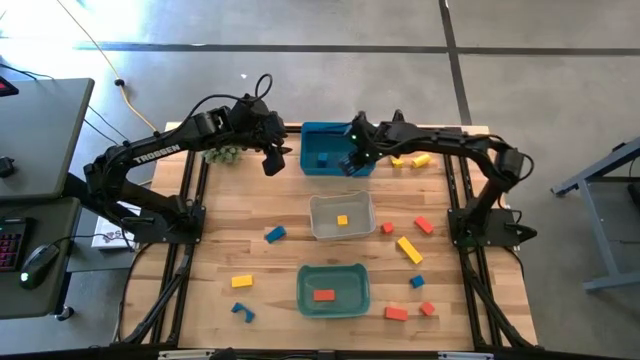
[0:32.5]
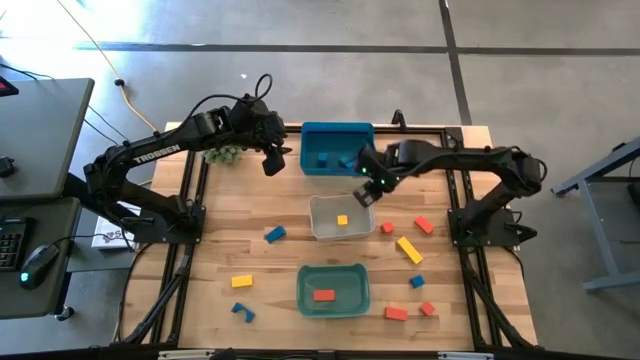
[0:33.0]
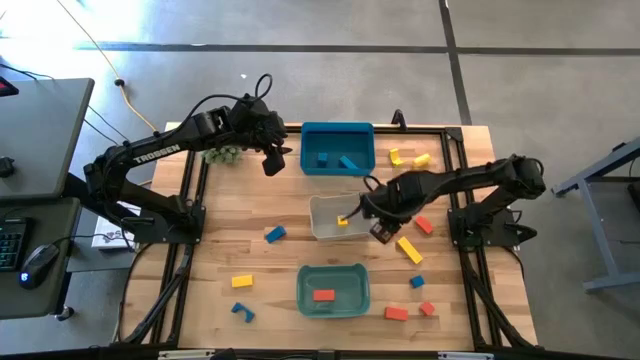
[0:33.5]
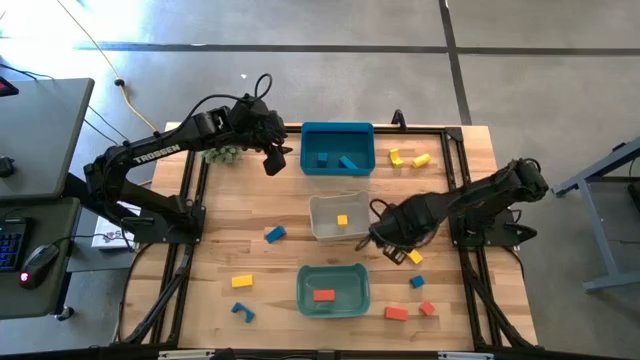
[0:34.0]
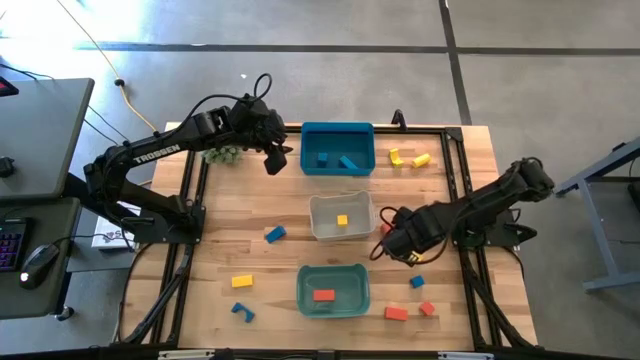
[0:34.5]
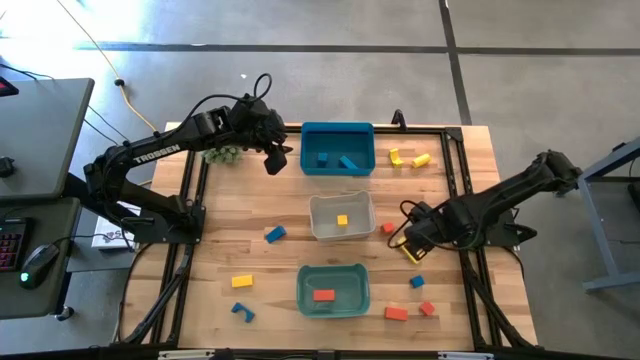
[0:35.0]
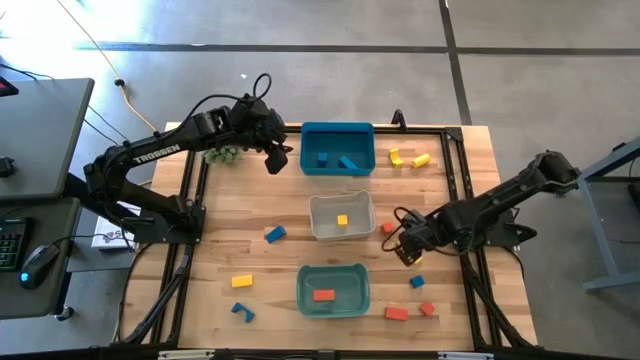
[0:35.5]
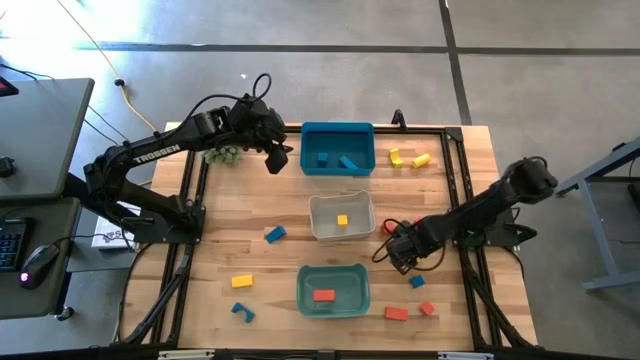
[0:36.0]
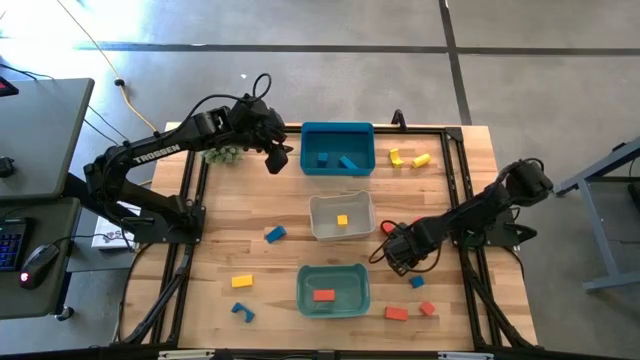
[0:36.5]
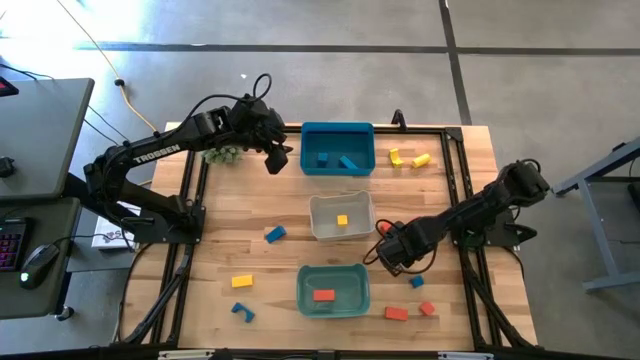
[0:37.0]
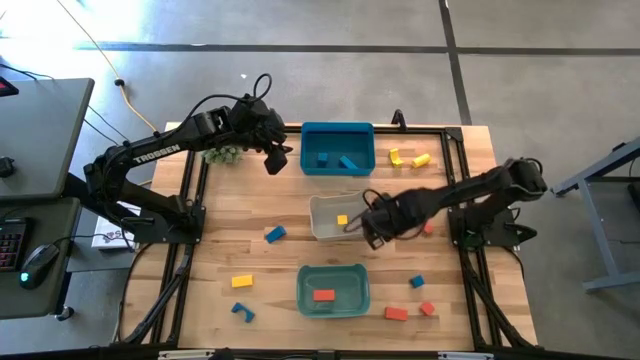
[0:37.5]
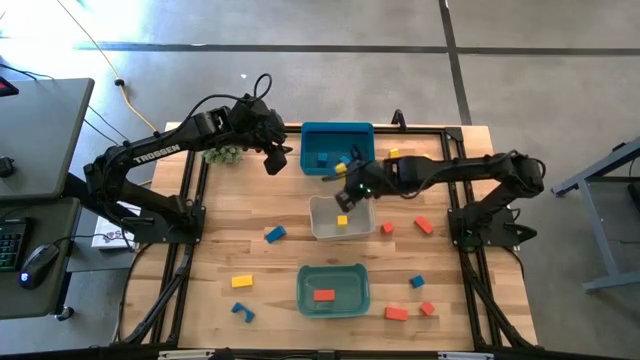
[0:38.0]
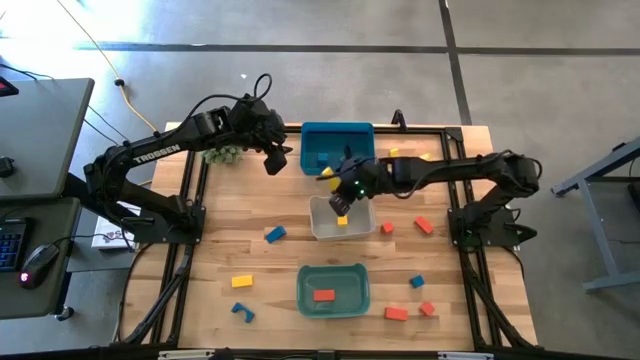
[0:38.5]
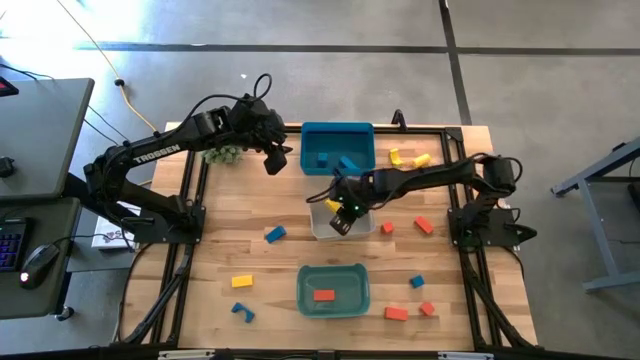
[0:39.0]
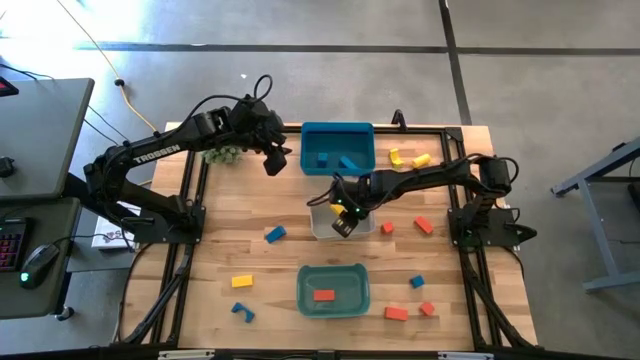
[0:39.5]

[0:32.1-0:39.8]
Task: Sort & place blocks by color
Put the yellow block into the white bin

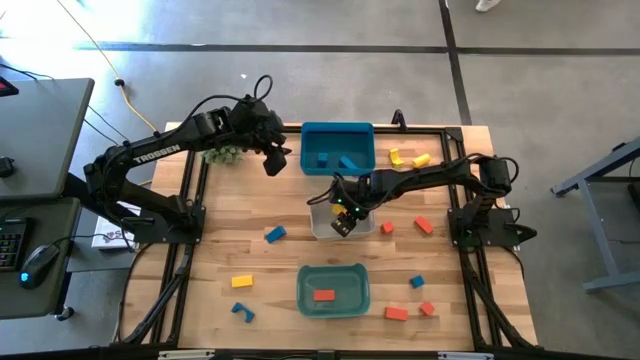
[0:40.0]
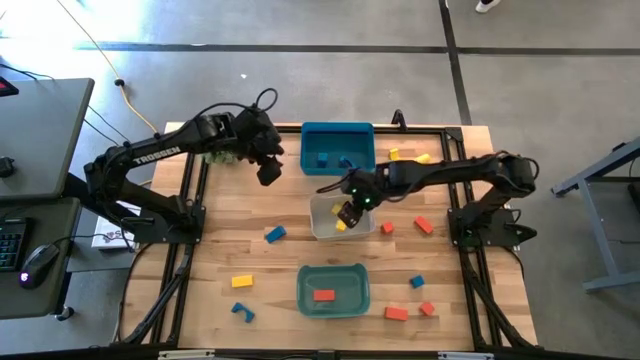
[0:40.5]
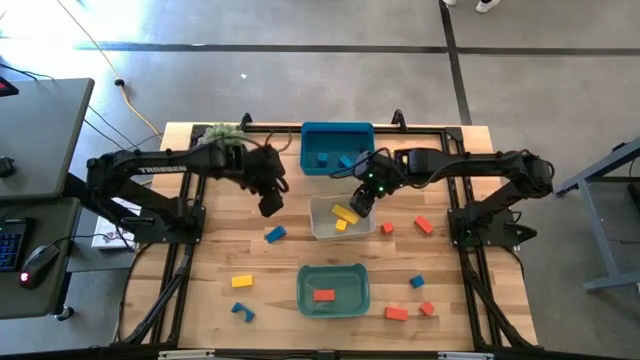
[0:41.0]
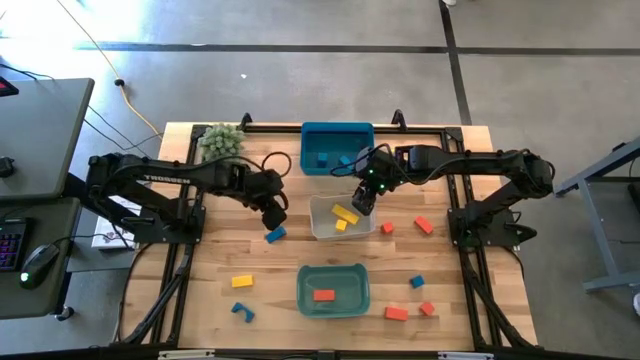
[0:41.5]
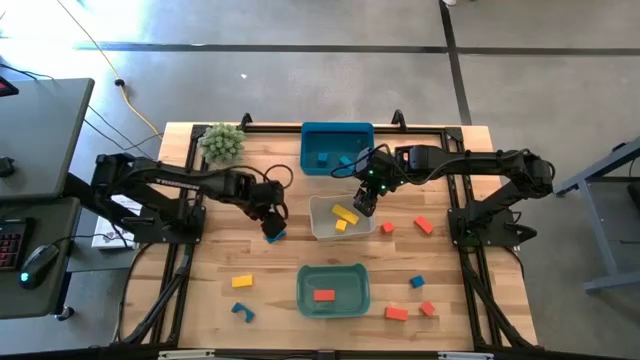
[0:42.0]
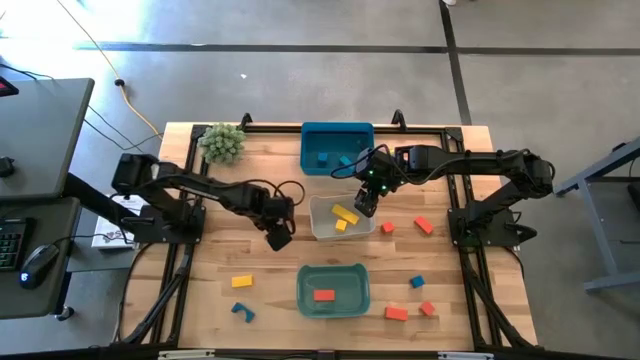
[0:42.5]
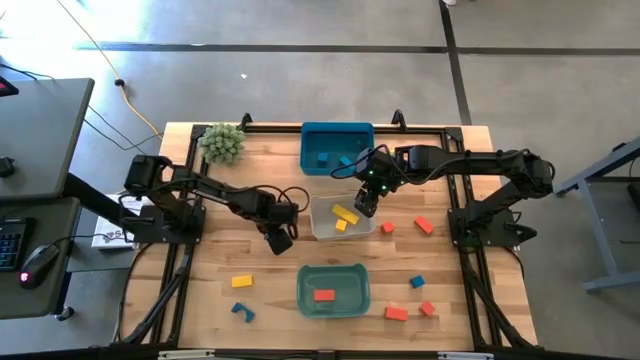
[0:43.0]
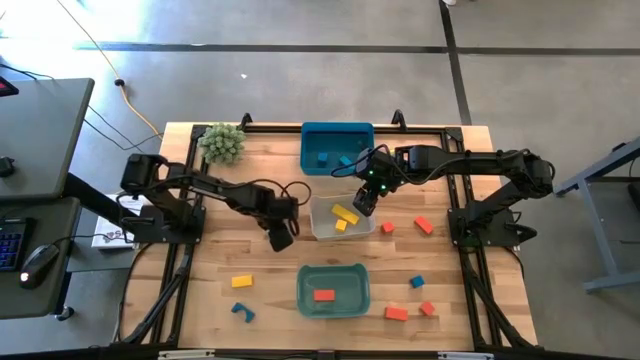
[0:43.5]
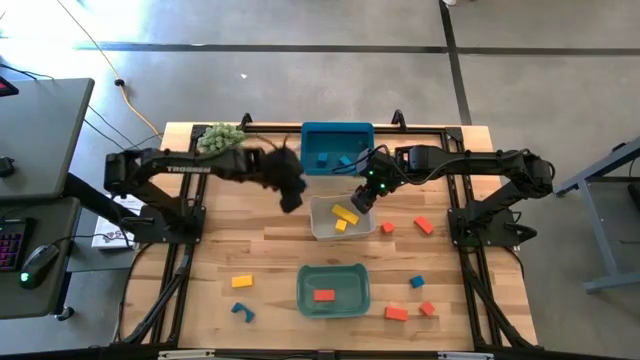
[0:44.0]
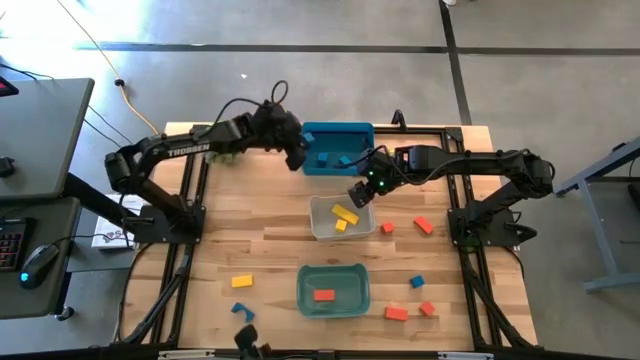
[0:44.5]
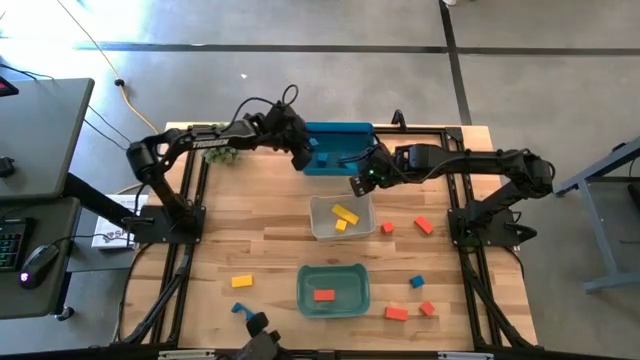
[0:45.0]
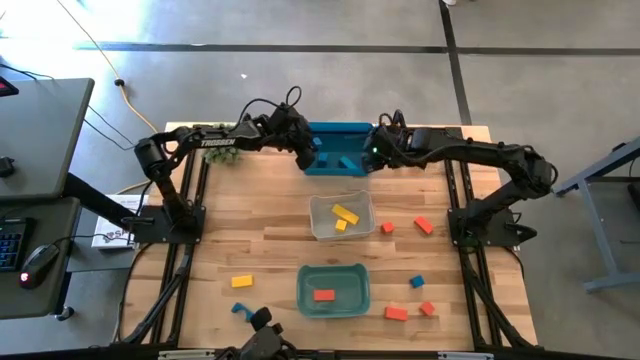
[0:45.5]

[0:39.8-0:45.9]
Put the blue block into the blue bin

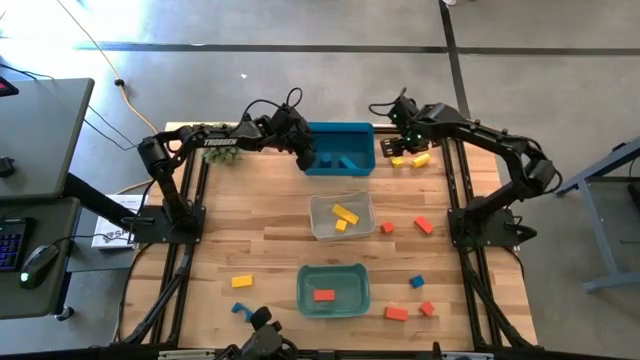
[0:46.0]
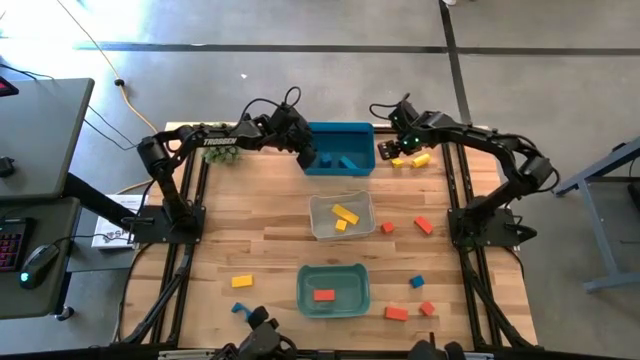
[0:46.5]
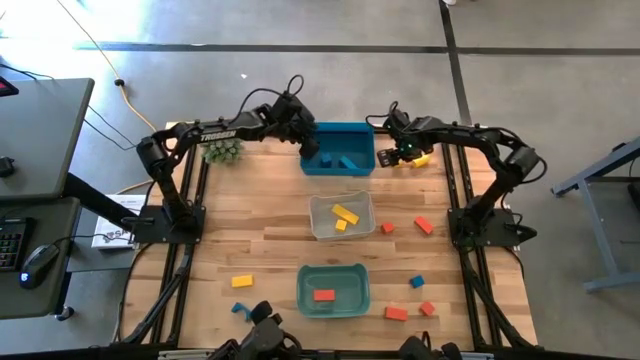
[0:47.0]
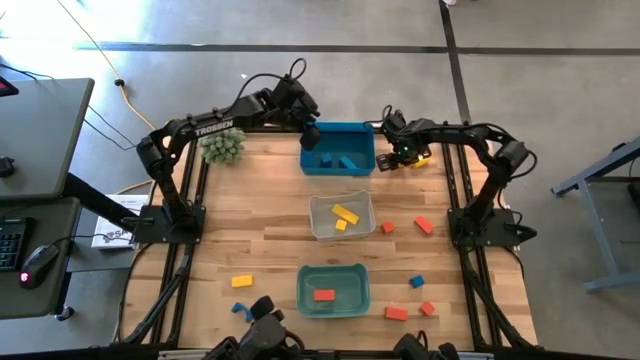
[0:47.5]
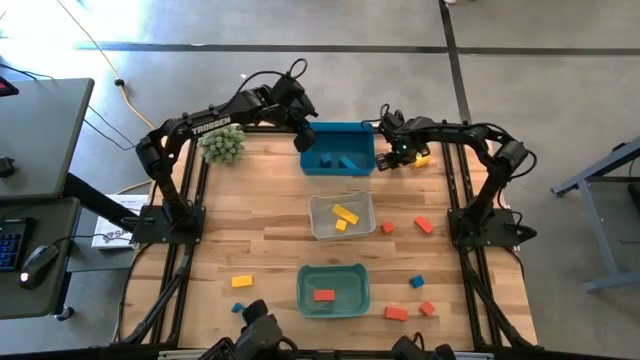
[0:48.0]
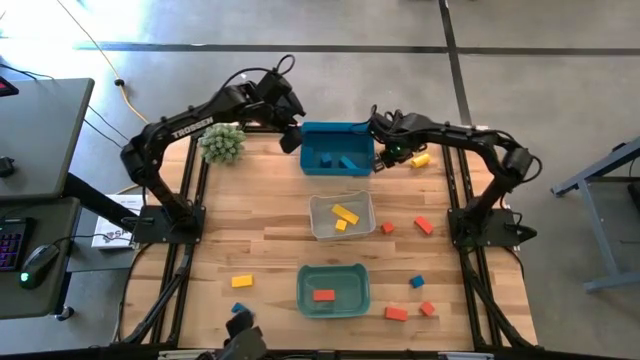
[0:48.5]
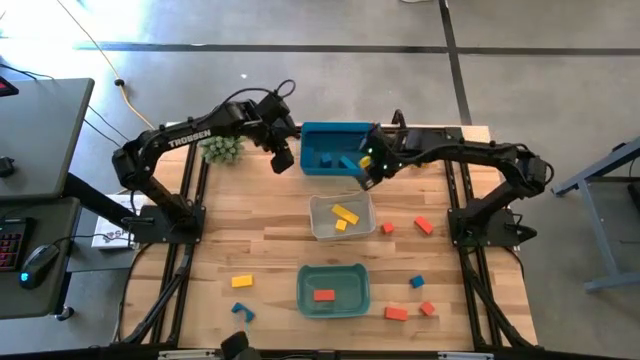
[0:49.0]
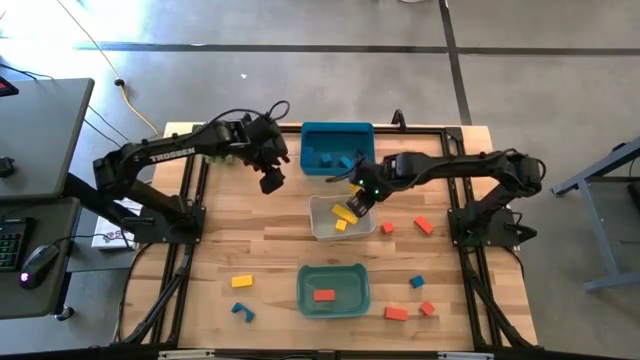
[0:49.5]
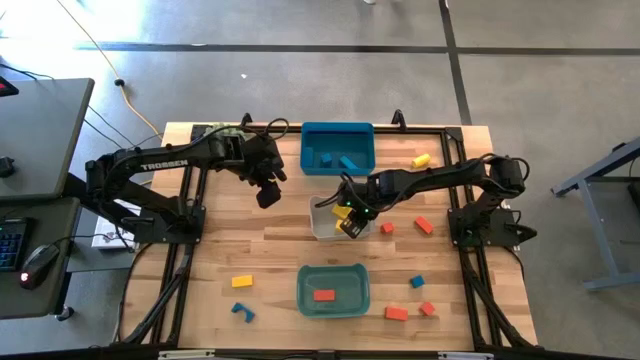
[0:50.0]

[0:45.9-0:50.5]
Put the yellow block into the white bin

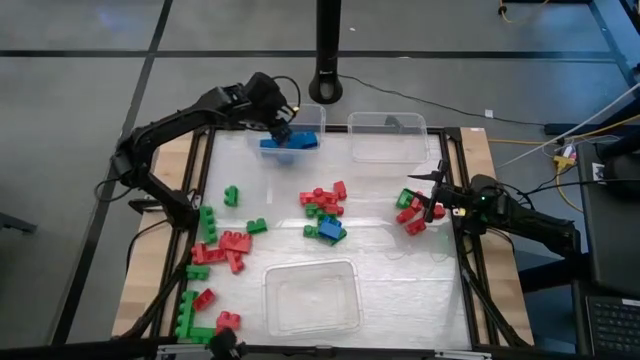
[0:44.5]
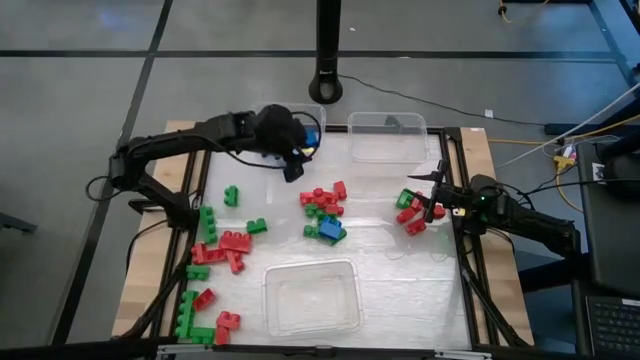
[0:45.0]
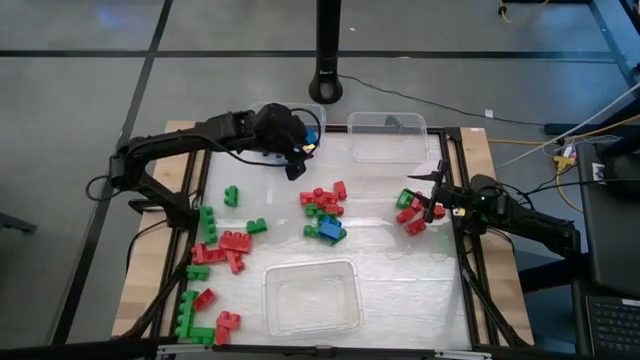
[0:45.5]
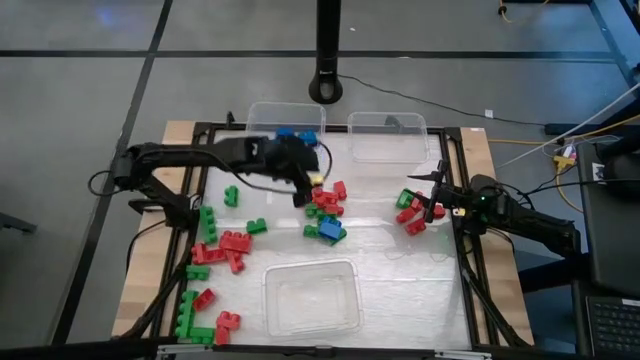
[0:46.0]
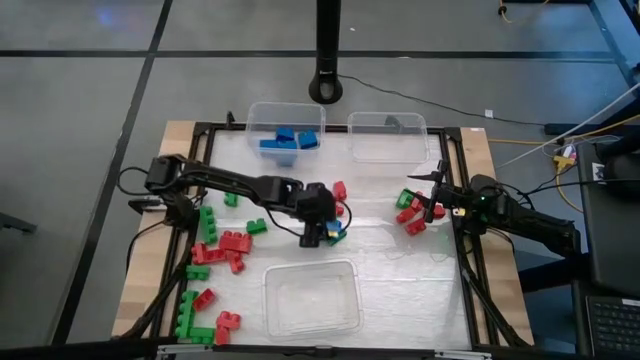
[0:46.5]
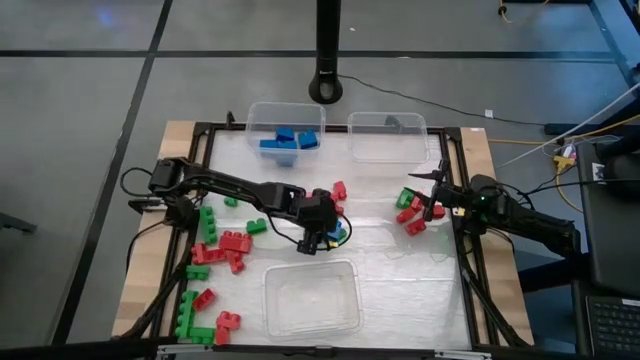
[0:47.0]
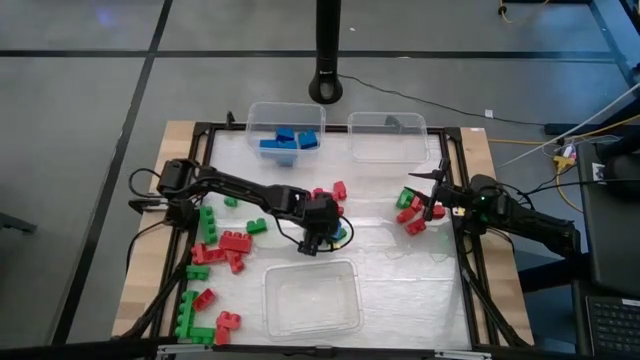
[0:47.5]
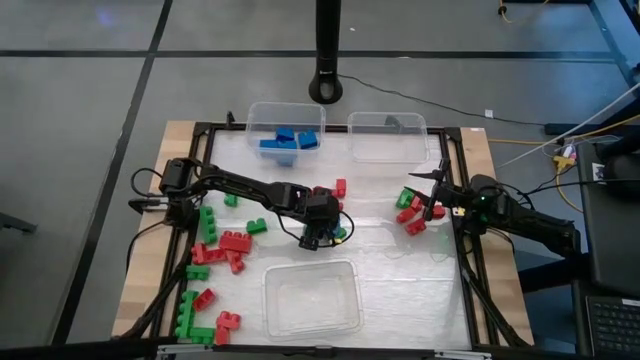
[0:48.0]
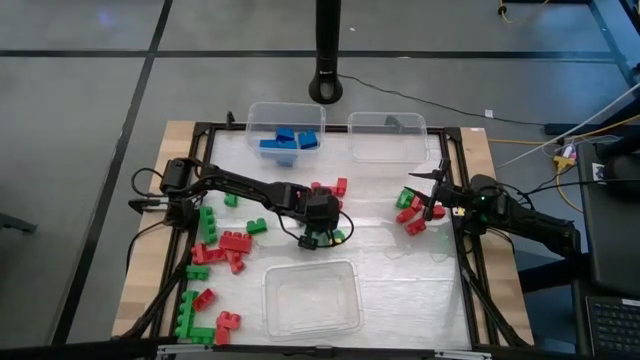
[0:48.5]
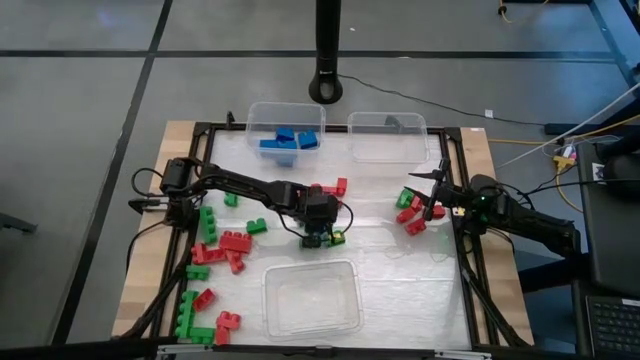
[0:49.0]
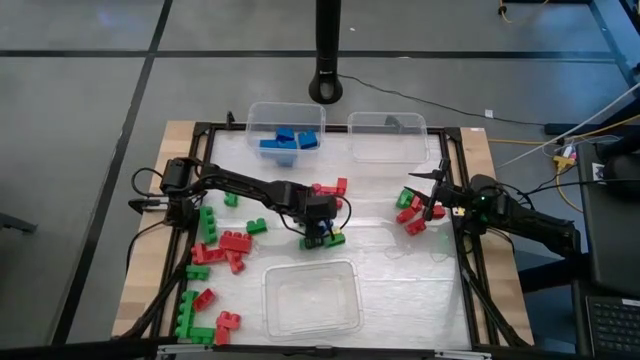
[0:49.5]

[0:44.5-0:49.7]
Task: Sort blocks
Put the blue game piece into the top left transparent bin
